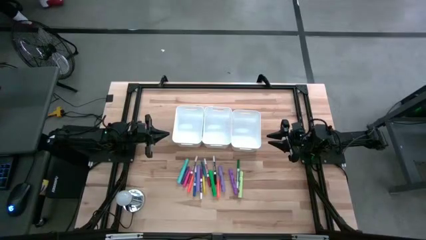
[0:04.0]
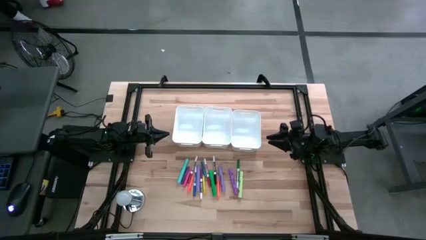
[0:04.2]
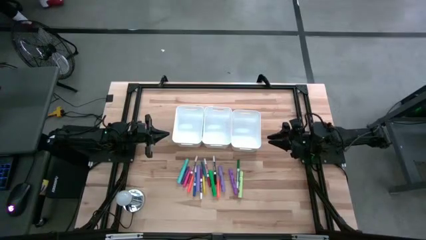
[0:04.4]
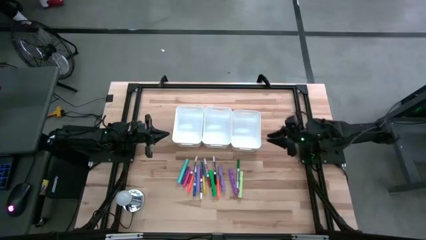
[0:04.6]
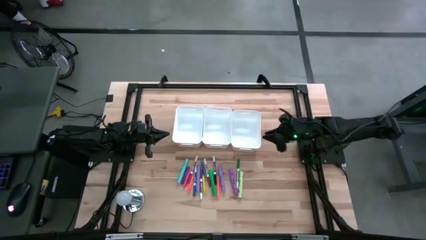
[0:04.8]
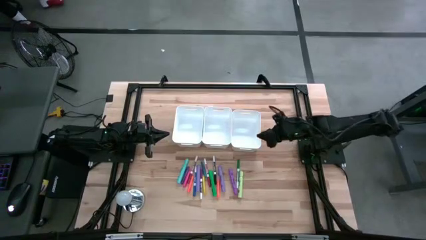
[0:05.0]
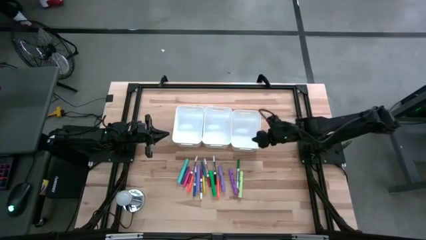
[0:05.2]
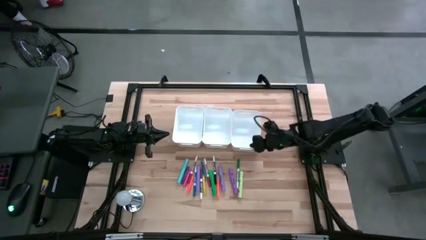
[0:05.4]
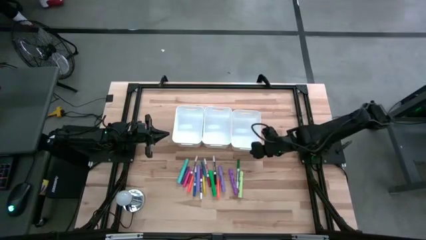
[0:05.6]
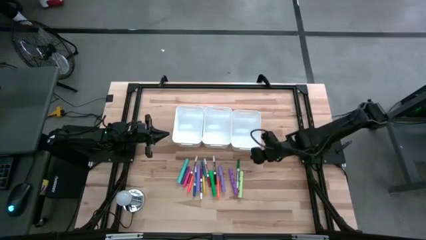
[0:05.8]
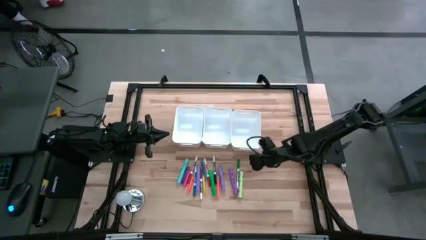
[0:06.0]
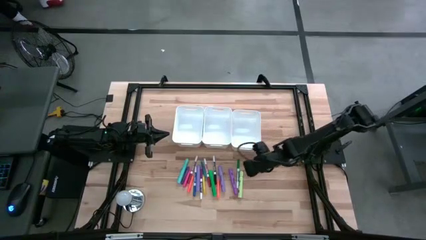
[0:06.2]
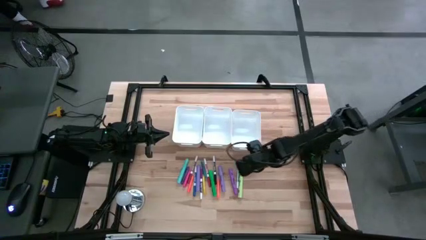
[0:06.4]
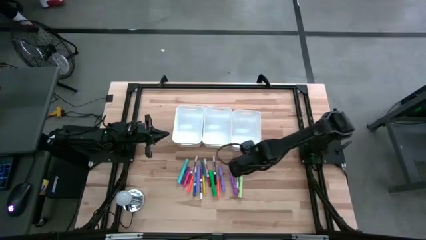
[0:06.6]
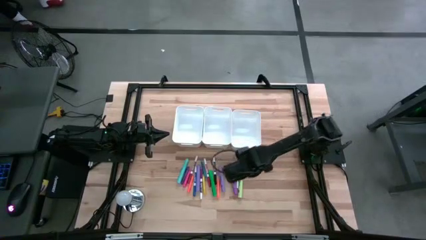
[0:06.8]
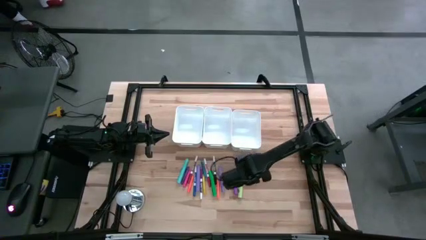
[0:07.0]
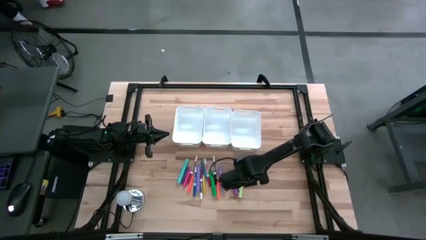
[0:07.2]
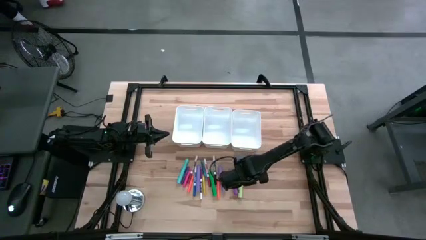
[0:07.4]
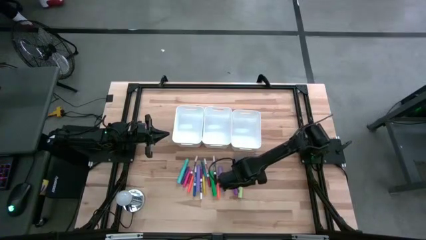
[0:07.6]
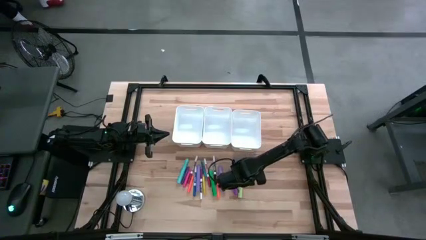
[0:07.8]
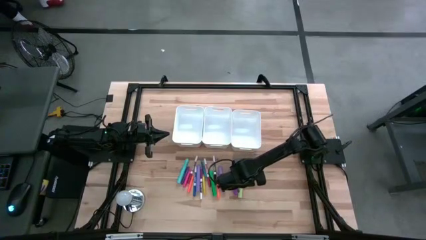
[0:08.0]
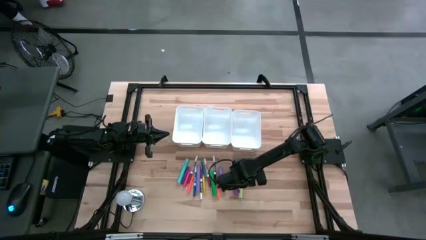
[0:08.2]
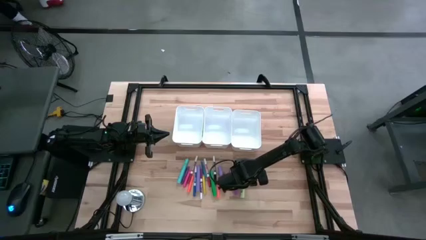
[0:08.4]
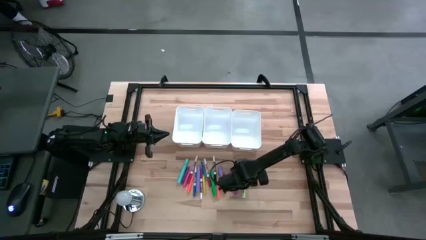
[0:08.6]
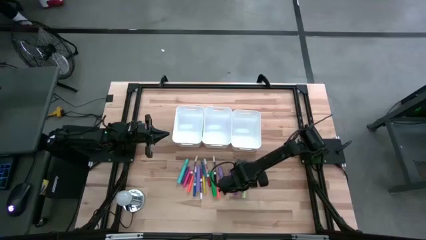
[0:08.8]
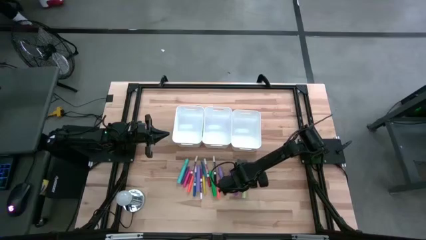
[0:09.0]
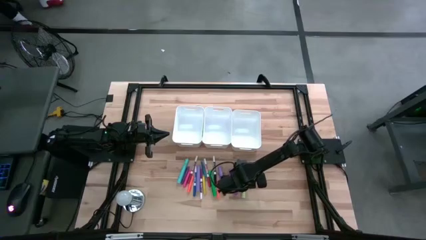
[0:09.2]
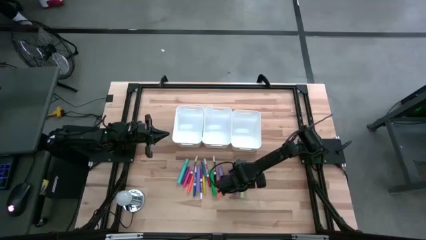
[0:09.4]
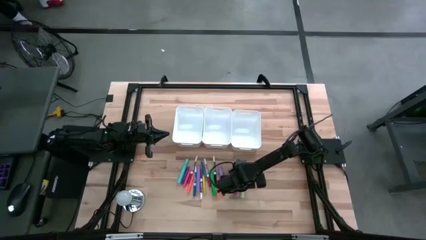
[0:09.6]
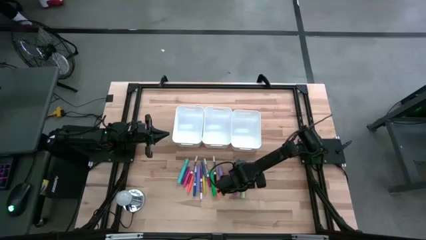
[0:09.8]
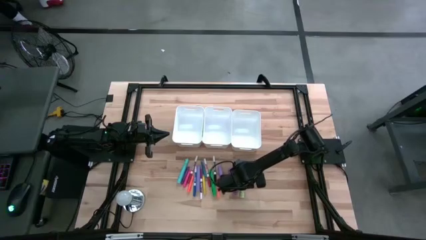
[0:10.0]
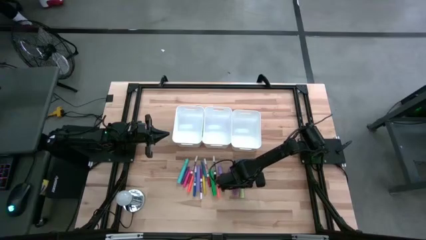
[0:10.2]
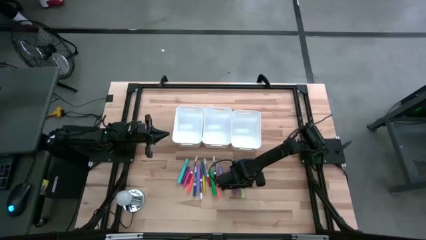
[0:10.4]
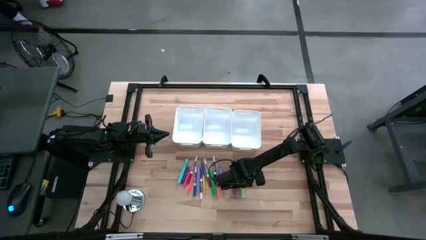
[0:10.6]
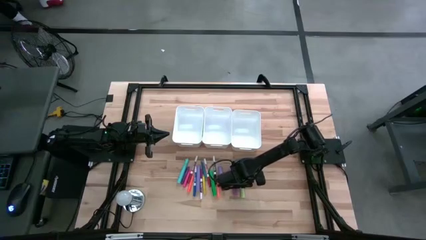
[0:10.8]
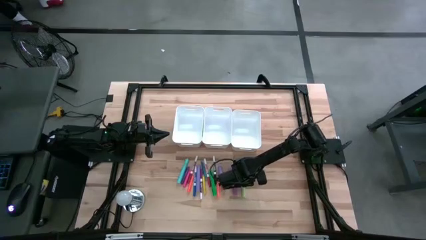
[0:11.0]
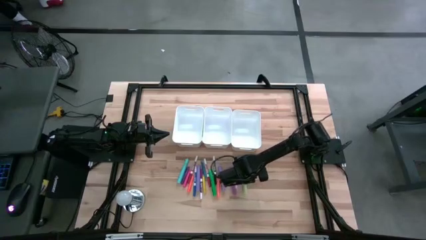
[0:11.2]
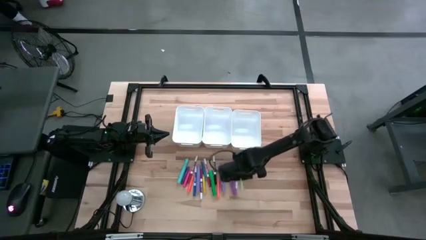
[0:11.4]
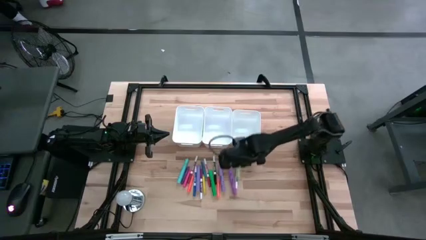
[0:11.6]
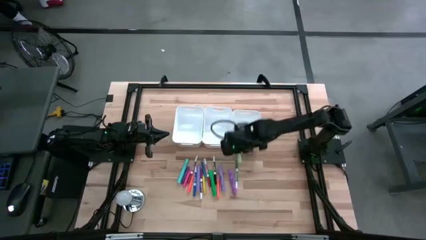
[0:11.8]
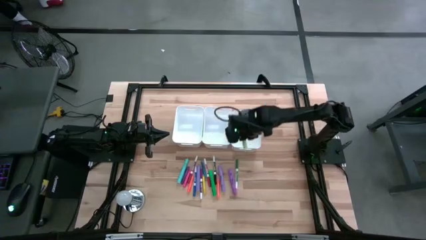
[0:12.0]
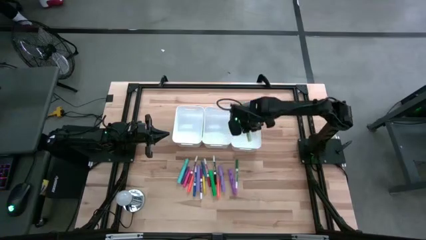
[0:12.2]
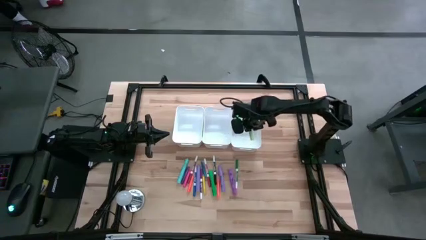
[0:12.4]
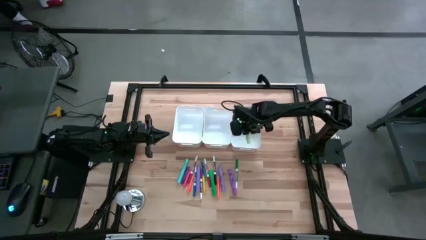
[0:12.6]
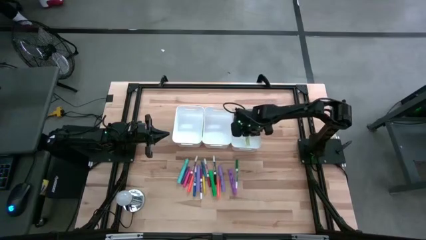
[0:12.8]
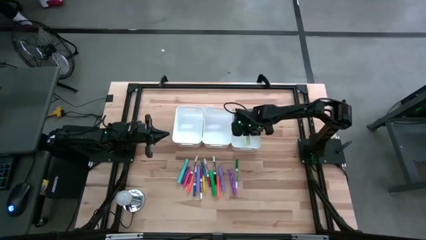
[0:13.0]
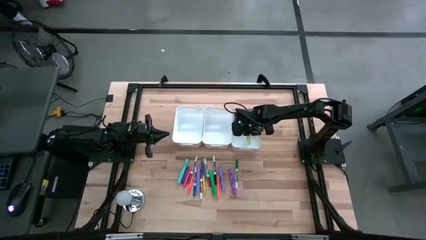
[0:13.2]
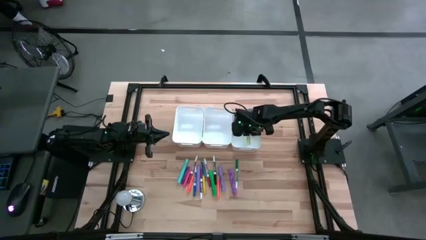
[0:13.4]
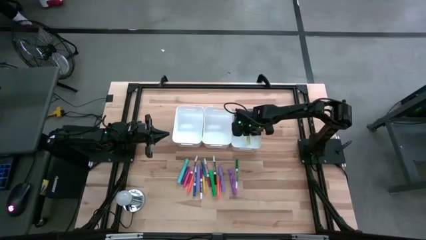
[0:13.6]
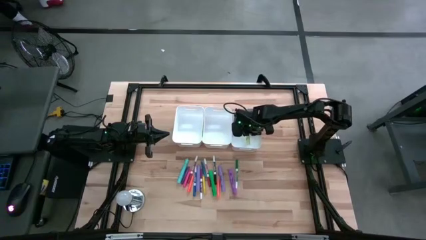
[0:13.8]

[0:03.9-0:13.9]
Task: Pick & Place Markers
Put the light green highlighter into the right white bin

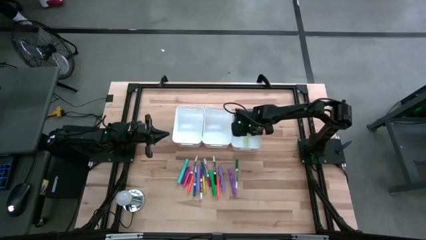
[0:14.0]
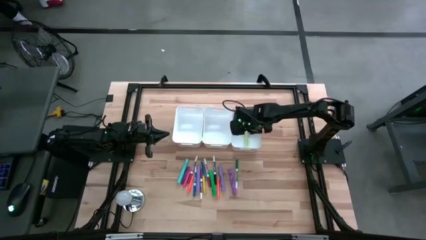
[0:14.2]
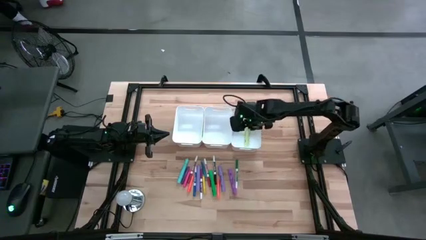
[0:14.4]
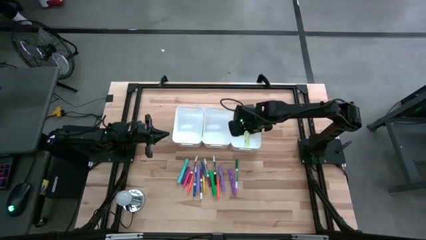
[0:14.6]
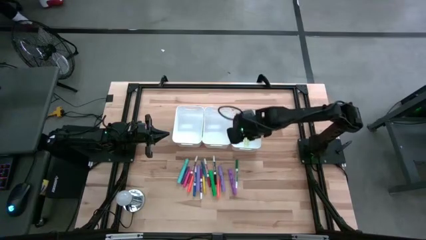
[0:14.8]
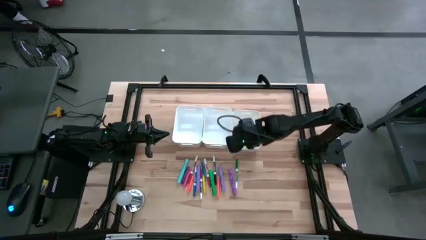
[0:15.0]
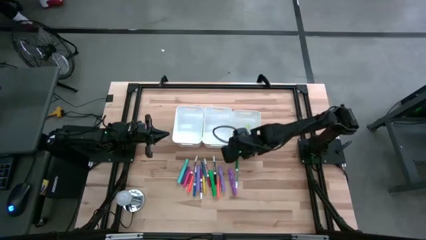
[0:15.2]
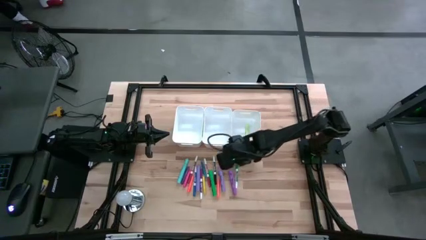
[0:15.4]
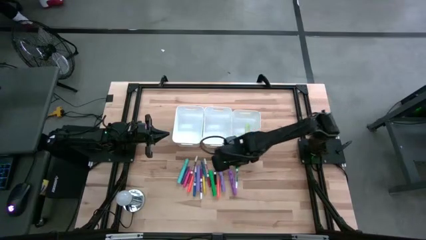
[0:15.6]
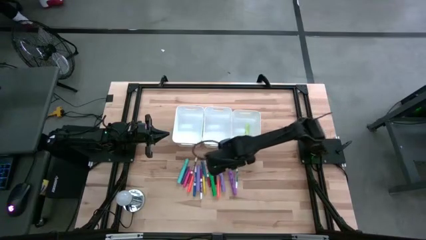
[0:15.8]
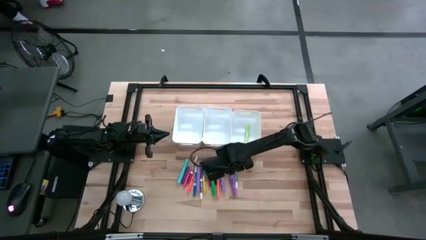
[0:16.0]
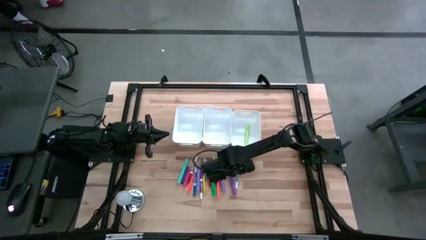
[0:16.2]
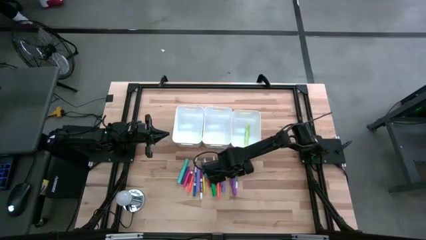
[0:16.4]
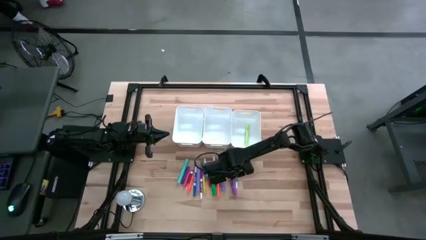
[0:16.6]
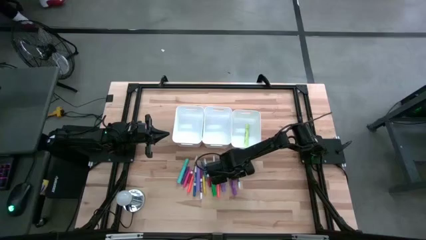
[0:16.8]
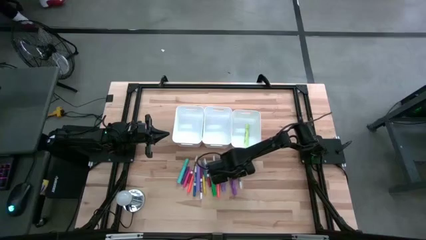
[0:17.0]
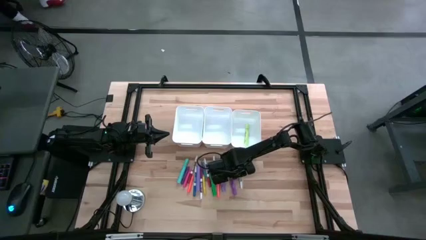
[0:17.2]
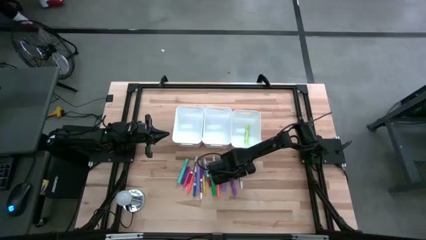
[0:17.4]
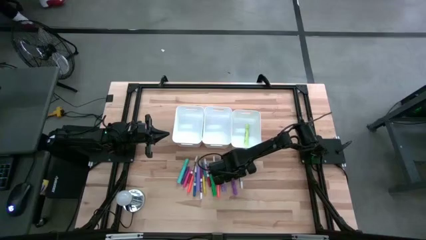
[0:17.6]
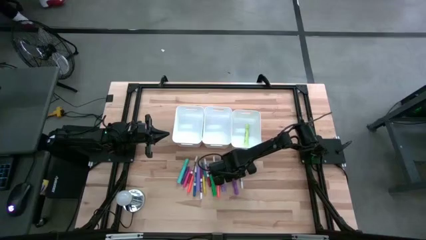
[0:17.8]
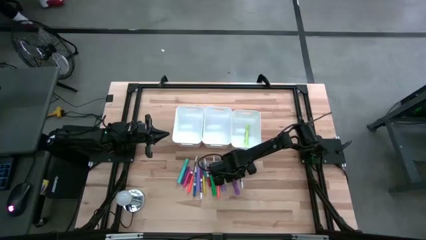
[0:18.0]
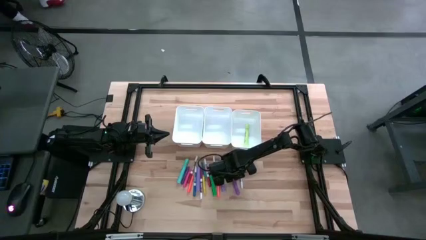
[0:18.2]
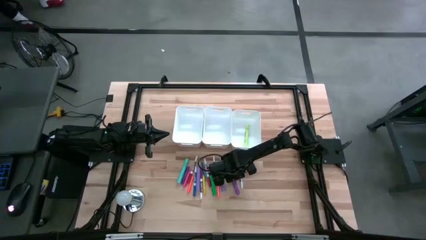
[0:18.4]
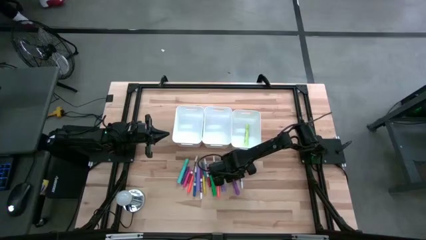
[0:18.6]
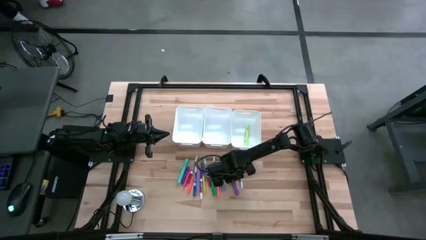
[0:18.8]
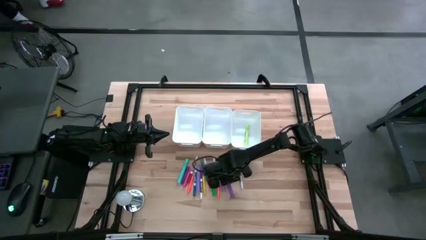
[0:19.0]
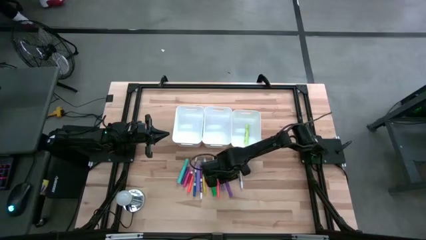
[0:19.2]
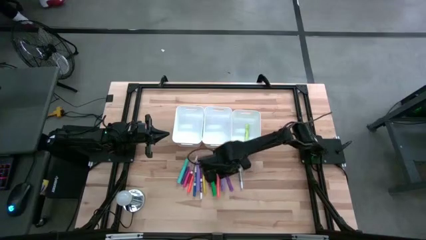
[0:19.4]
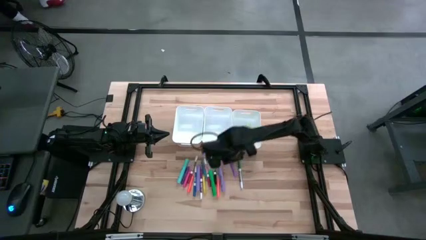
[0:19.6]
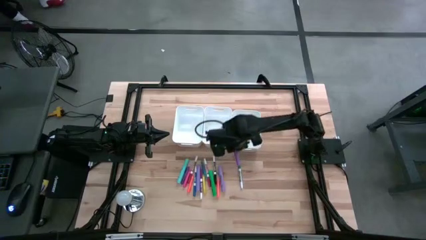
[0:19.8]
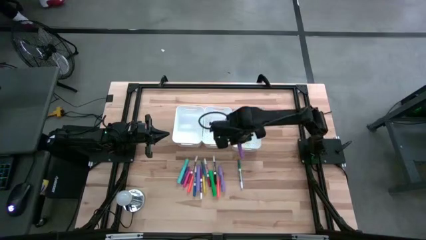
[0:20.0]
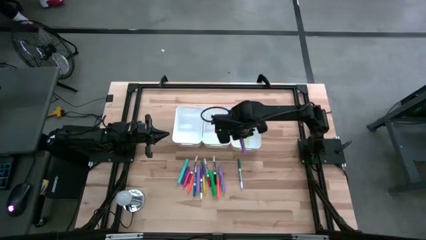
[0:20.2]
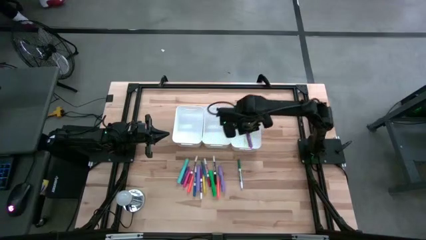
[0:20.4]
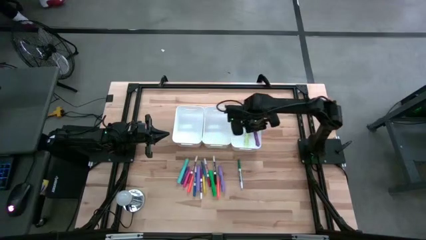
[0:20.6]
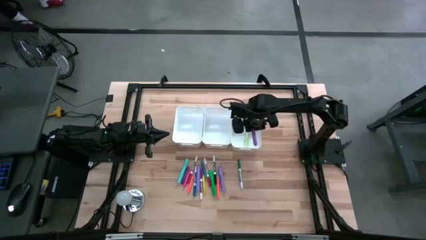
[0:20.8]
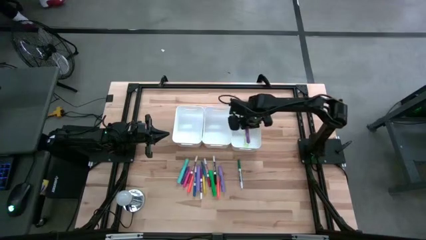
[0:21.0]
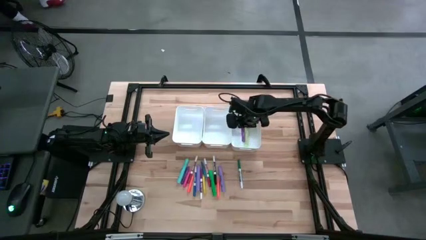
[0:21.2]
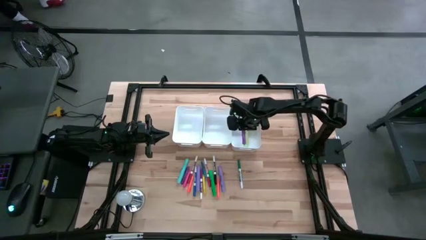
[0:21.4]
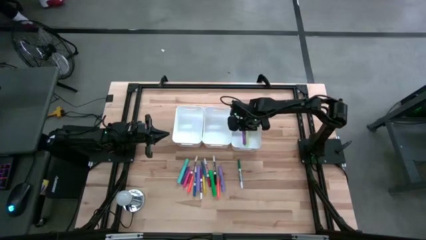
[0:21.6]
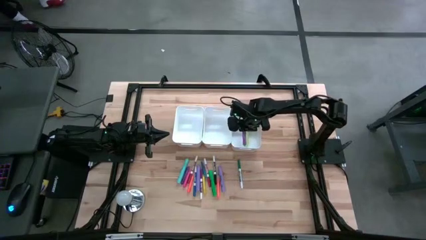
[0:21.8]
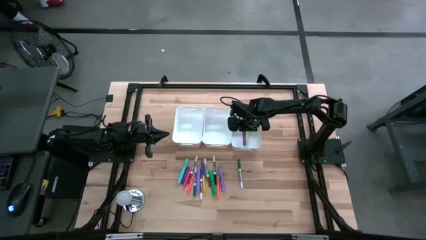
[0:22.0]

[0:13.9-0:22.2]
Put the violet highlighter into the right white bin
